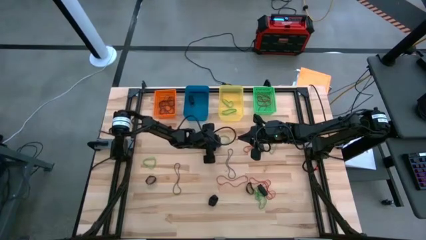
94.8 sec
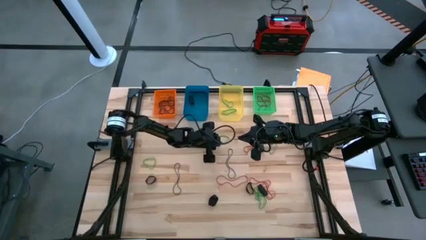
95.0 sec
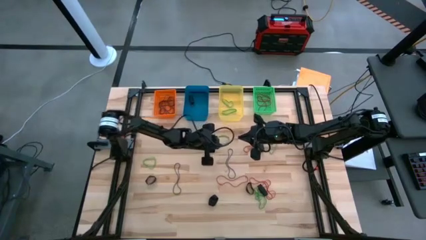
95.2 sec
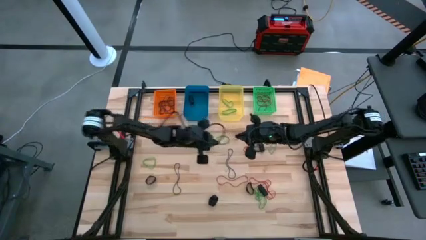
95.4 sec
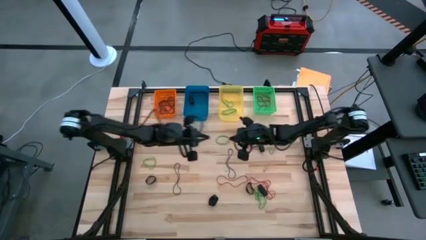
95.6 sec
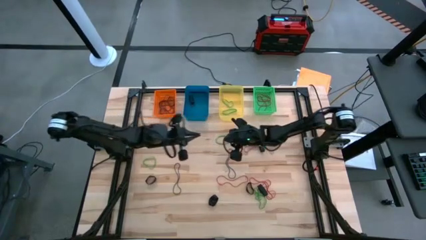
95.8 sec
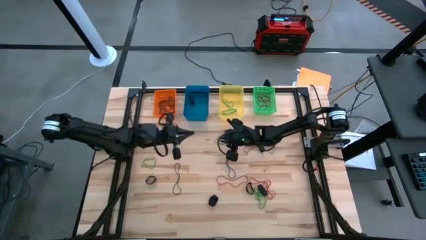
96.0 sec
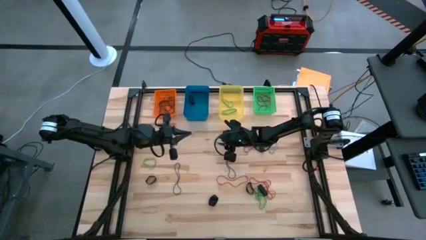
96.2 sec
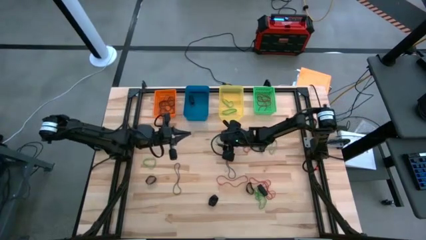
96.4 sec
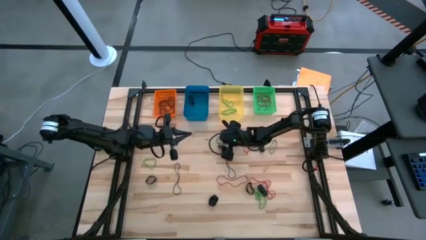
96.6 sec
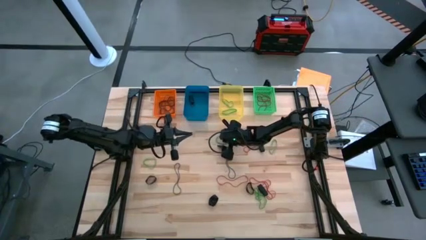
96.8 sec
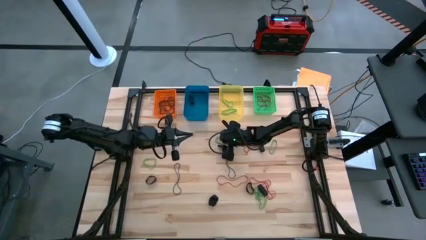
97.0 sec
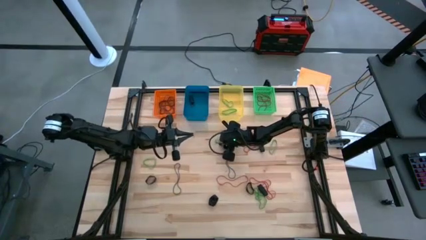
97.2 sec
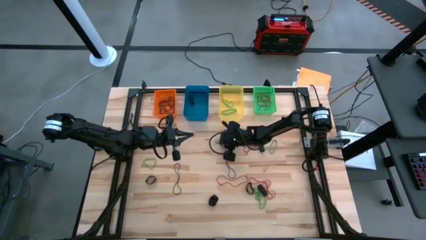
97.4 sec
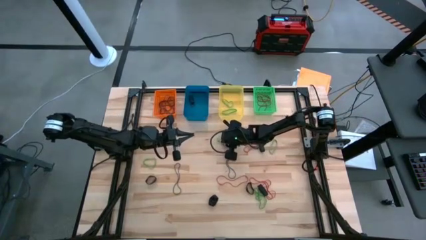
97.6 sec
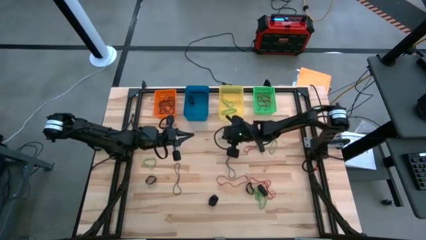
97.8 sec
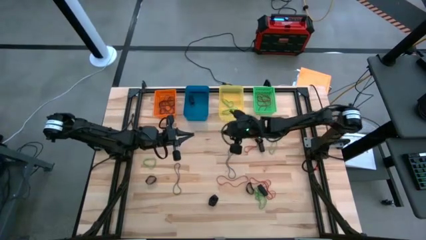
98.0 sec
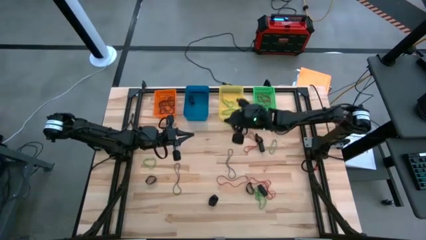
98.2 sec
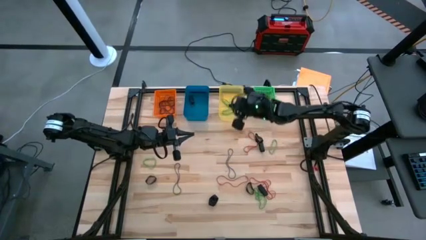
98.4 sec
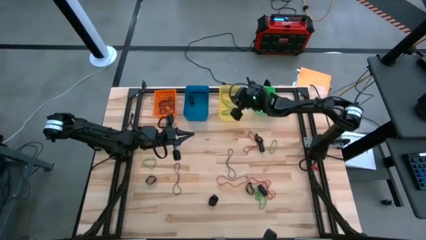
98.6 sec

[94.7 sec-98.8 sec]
Task: Sort rubber bands into baskets
Put the green rubber band into the yellow bin

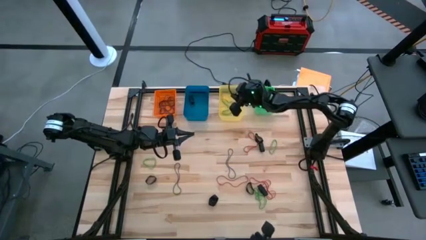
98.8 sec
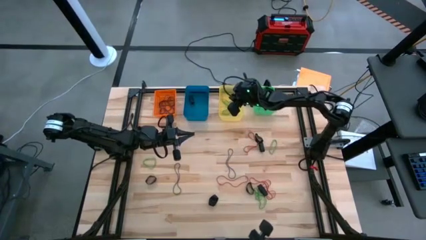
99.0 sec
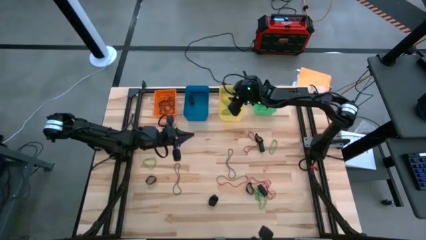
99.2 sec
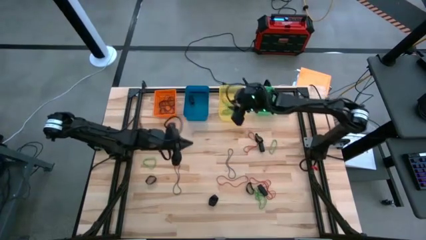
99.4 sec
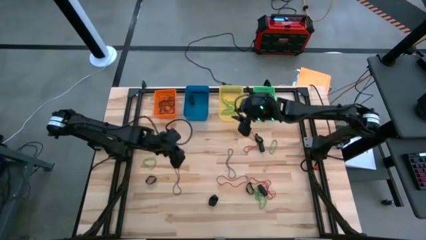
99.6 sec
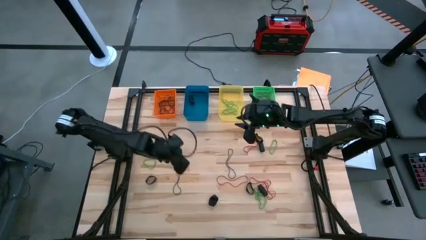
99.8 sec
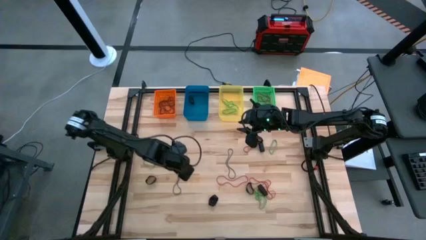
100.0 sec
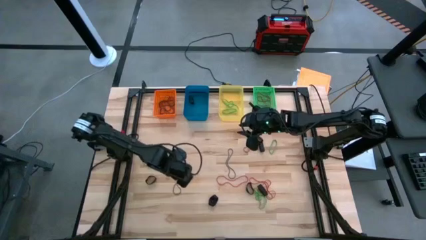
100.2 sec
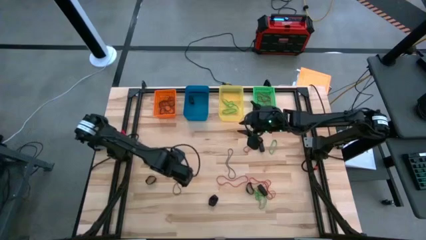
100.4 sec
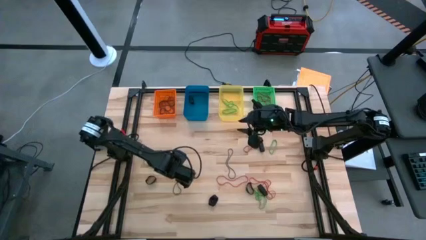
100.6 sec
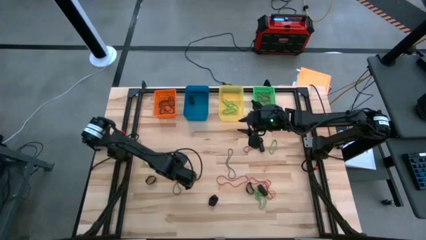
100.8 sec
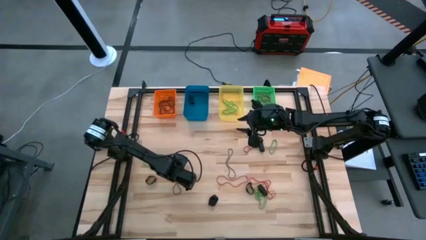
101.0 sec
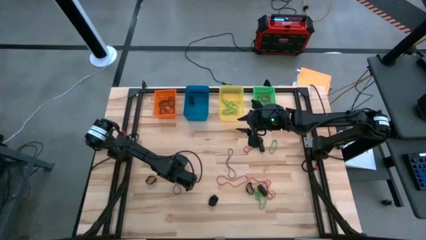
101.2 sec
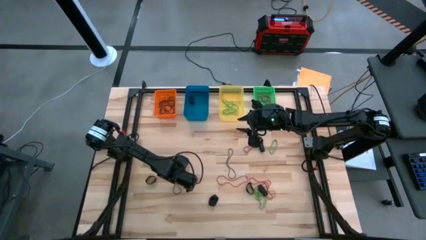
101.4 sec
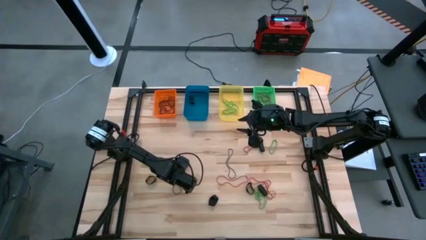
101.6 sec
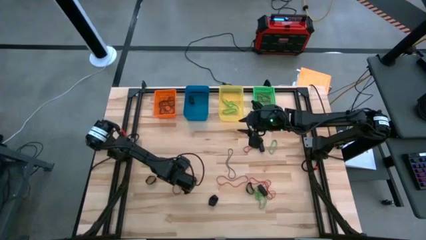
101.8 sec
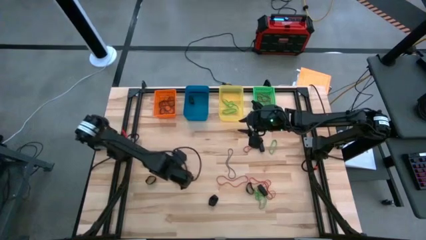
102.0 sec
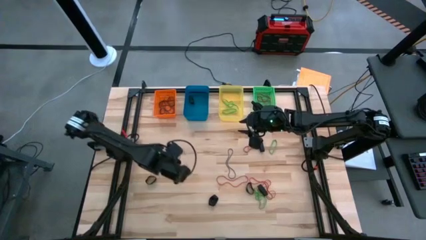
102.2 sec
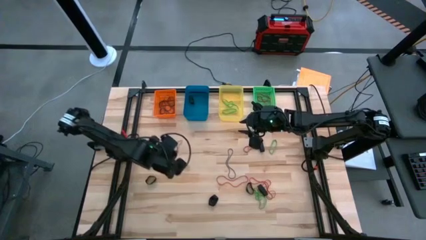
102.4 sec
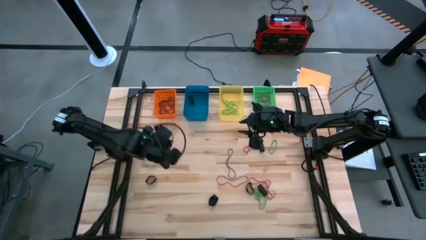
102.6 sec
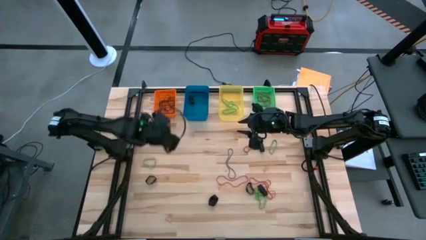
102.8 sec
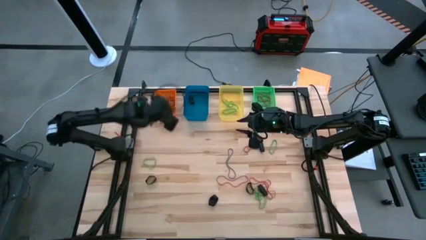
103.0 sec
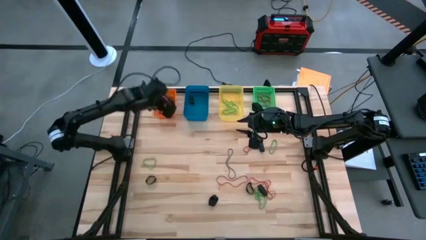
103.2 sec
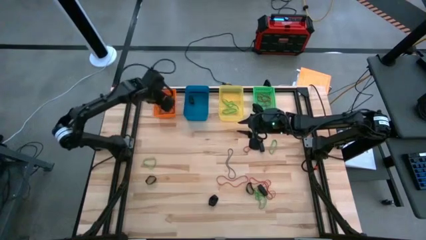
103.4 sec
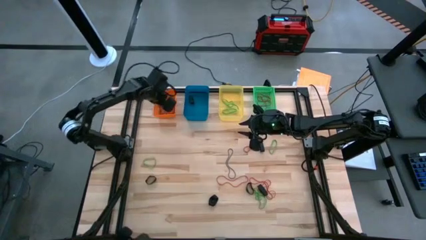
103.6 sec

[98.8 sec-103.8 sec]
Put the violet rubber band into the orange bin

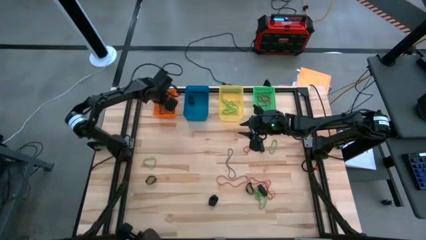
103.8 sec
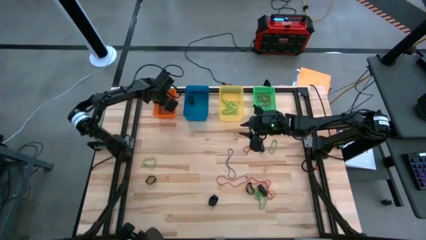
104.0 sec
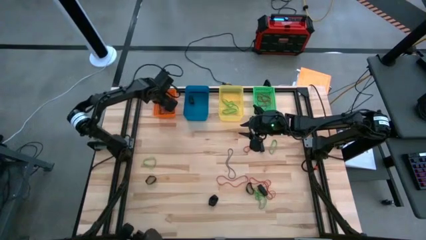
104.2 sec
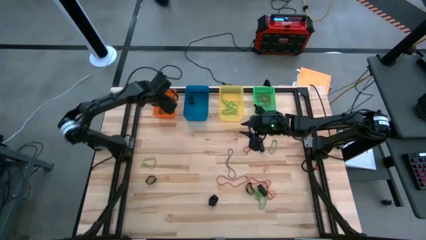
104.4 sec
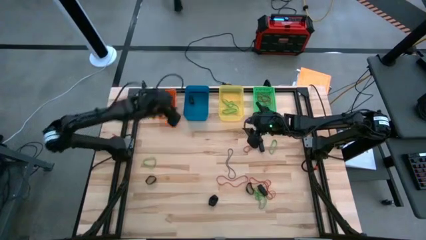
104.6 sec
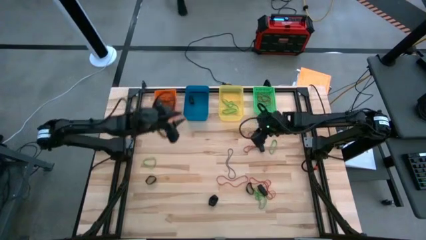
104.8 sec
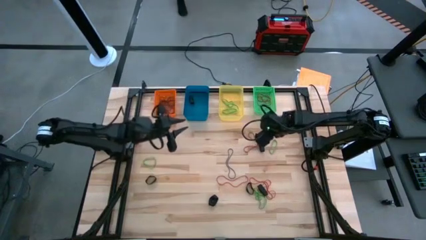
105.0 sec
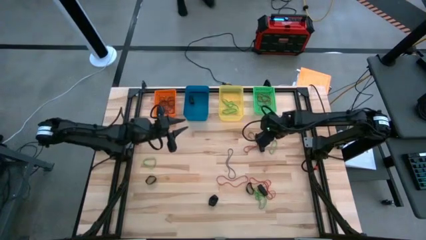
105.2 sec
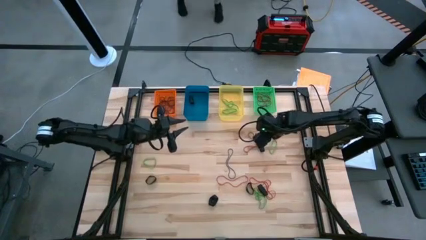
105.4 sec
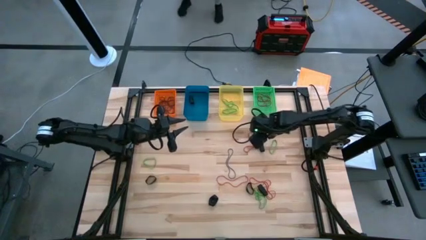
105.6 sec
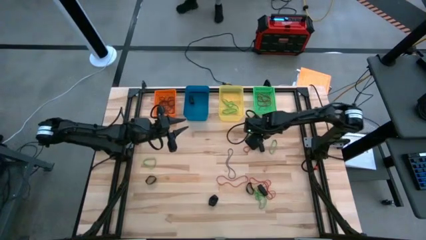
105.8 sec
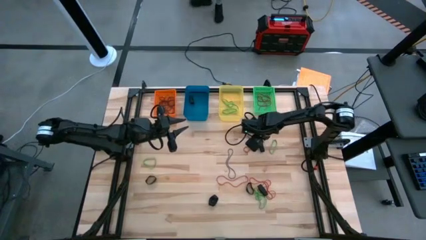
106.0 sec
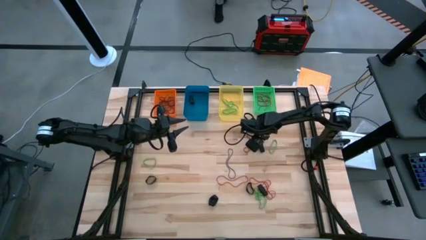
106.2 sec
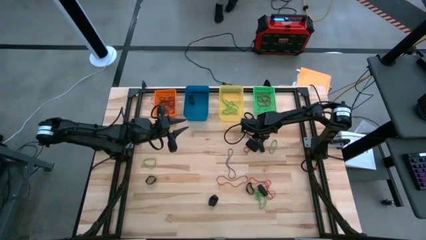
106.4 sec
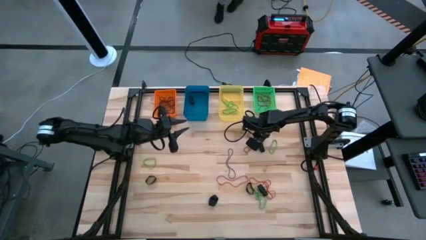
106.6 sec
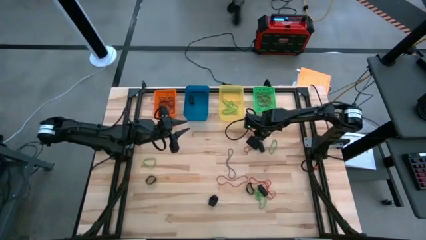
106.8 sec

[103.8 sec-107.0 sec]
Put the black rubber band into the blue bin

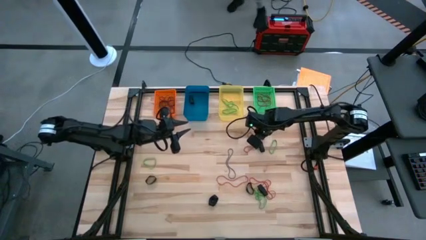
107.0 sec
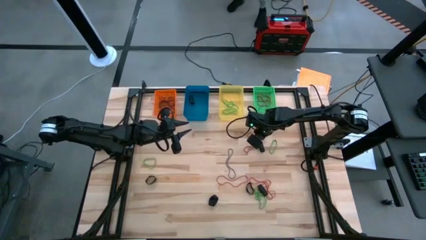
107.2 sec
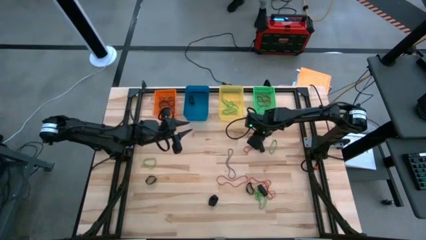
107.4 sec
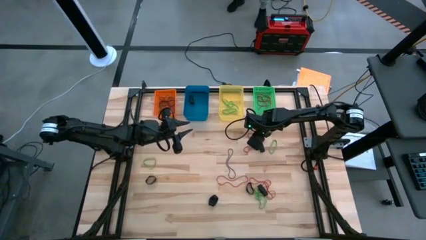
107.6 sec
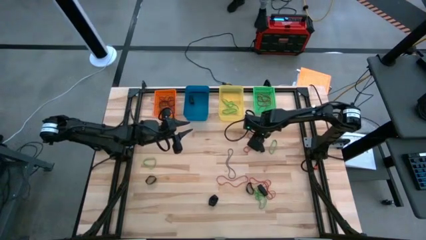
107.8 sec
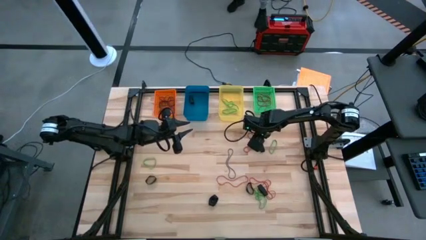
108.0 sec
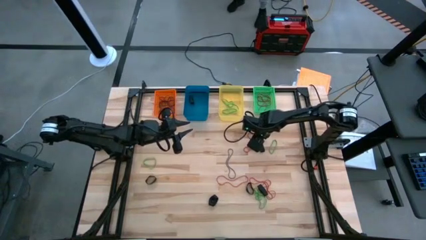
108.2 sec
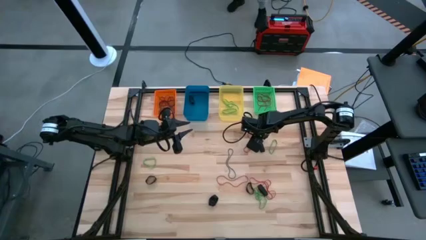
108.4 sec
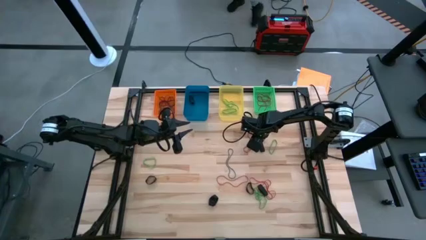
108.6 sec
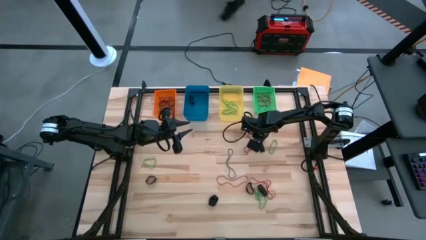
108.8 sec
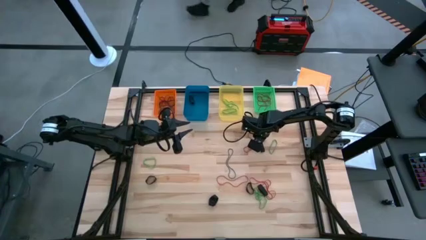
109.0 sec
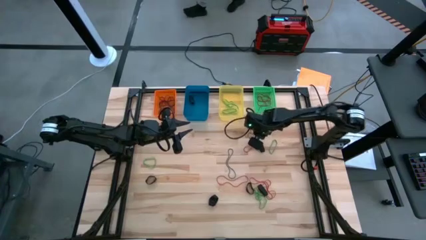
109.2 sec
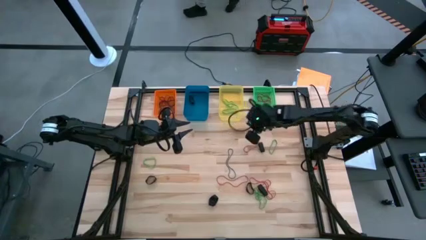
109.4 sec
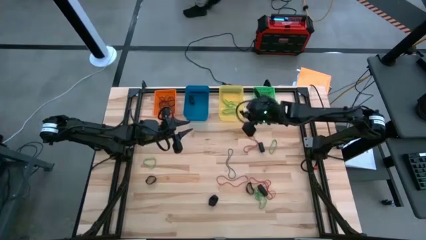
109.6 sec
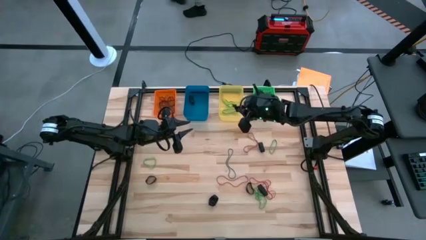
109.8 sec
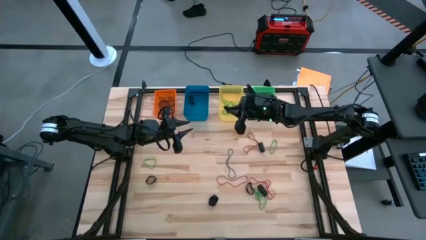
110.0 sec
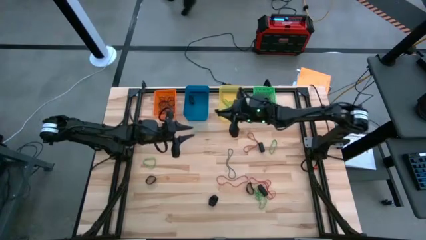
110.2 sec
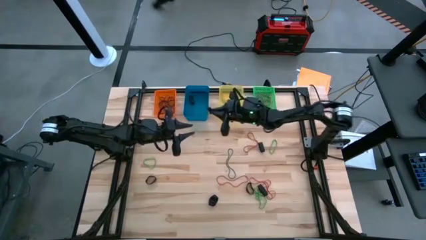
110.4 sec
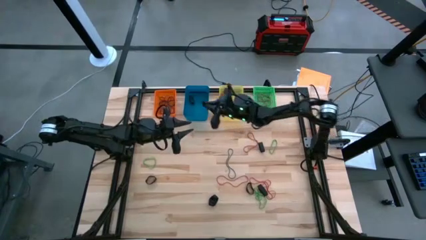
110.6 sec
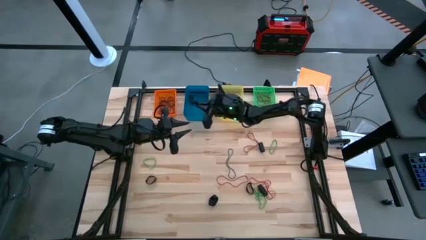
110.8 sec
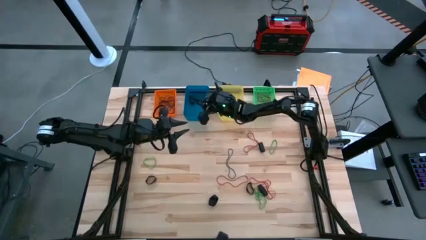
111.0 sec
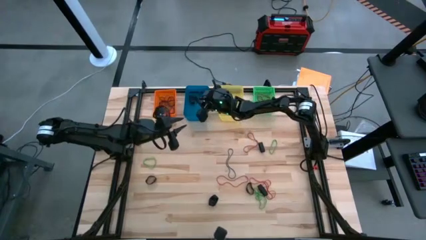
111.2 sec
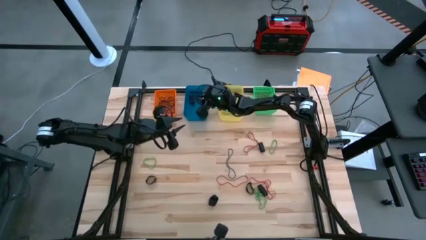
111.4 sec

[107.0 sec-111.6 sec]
Put the black rubber band into the blue bin

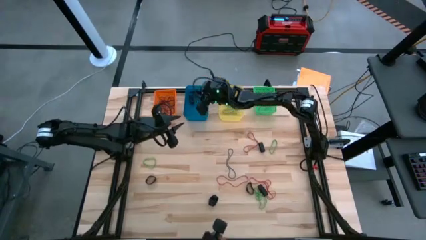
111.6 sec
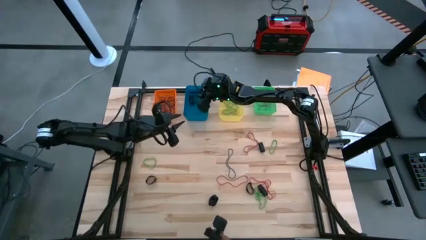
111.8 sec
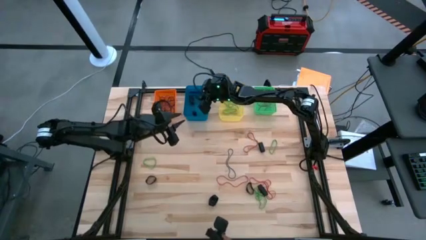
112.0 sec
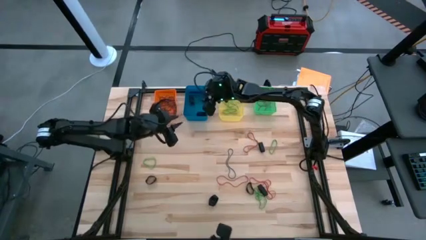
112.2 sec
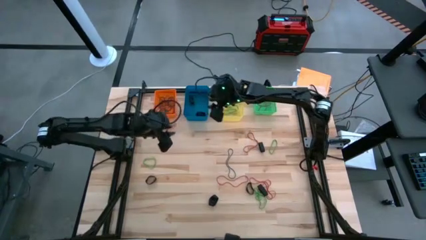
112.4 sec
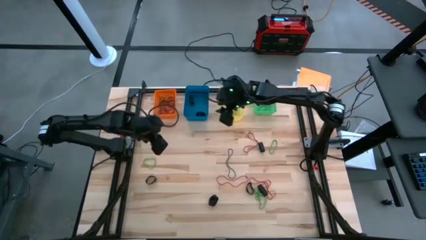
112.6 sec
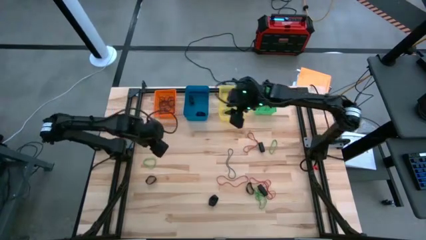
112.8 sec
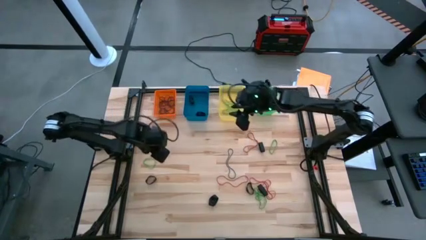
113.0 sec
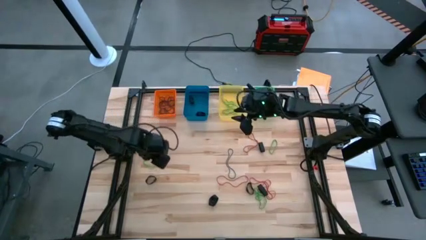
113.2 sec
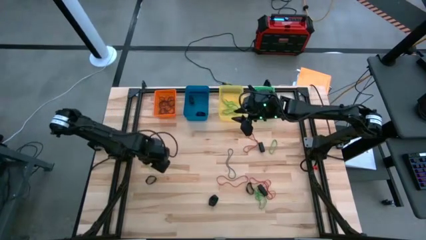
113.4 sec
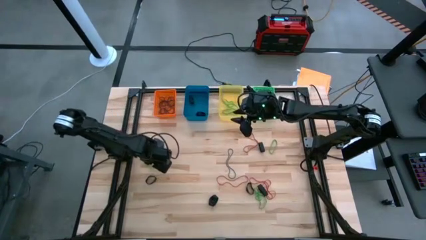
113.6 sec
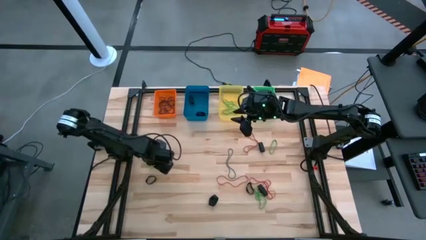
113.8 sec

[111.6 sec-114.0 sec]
Put the green rubber band into the yellow bin
